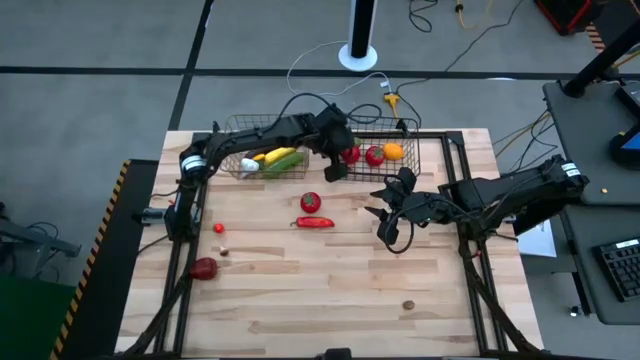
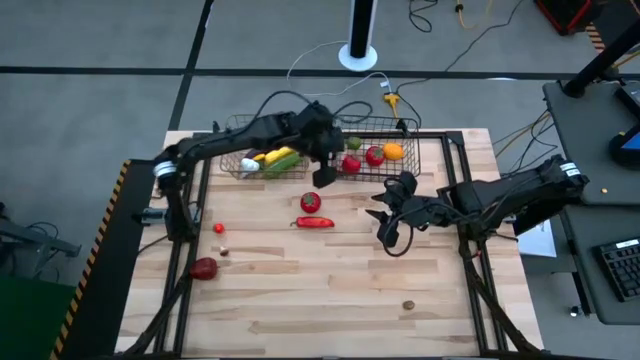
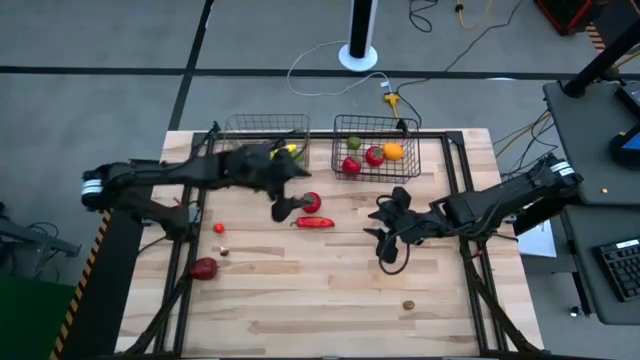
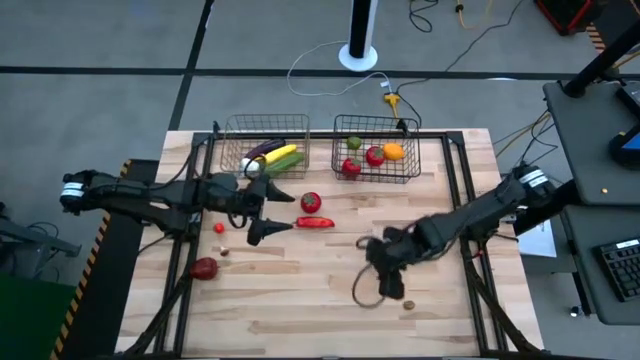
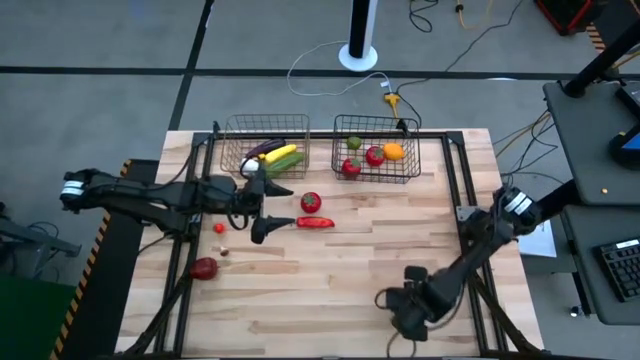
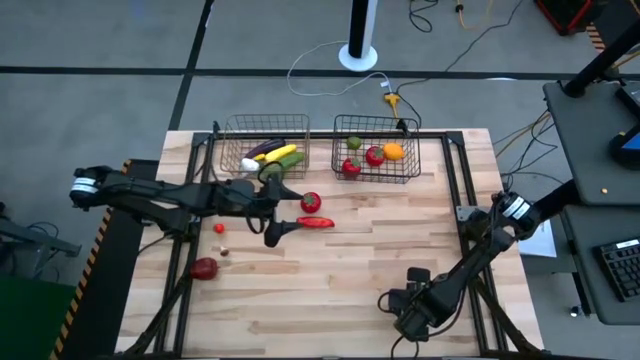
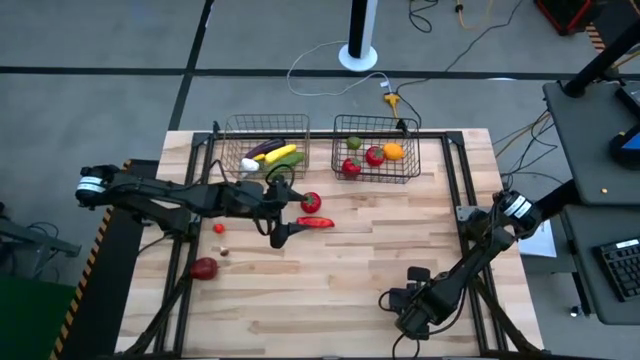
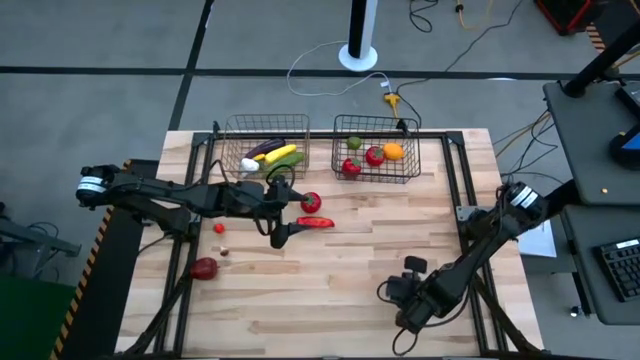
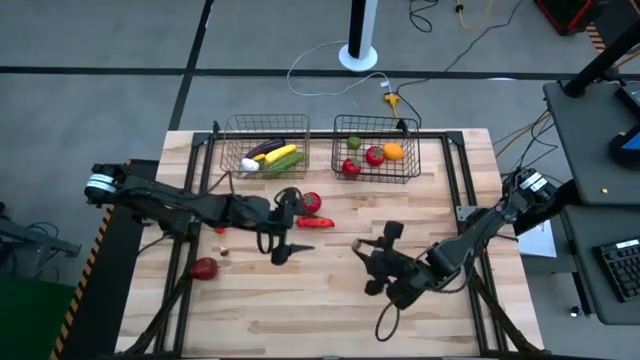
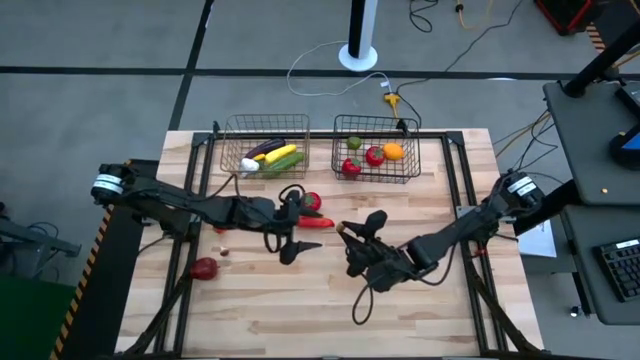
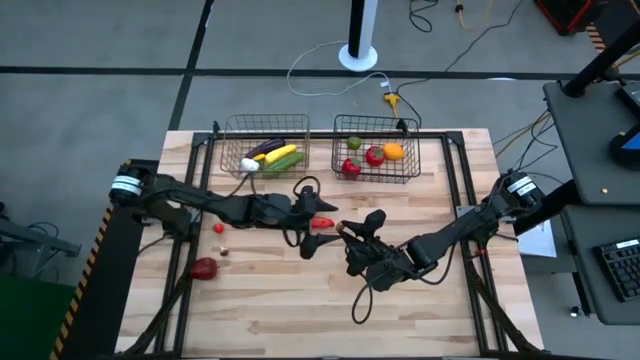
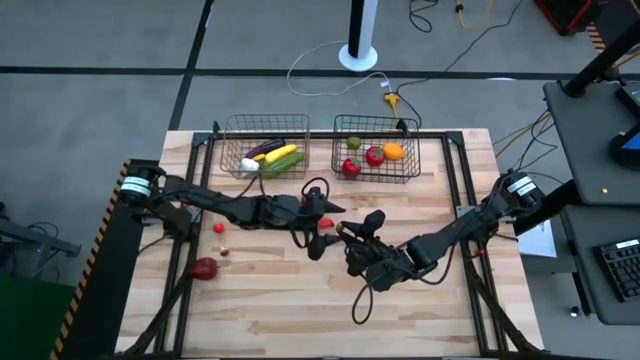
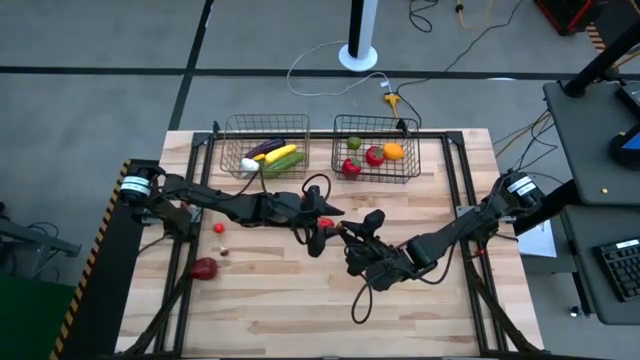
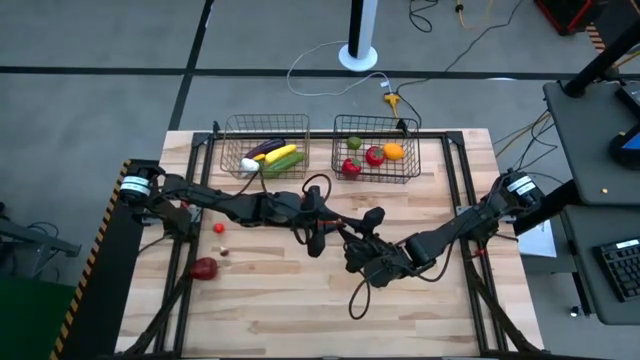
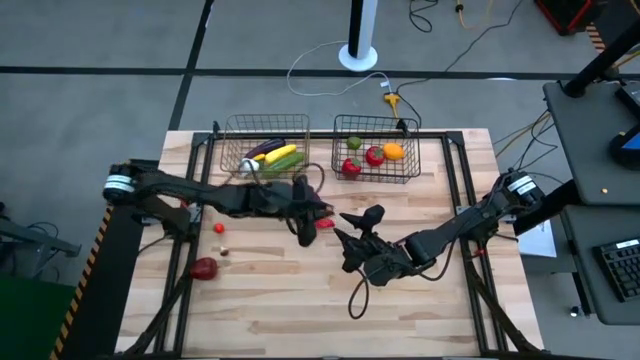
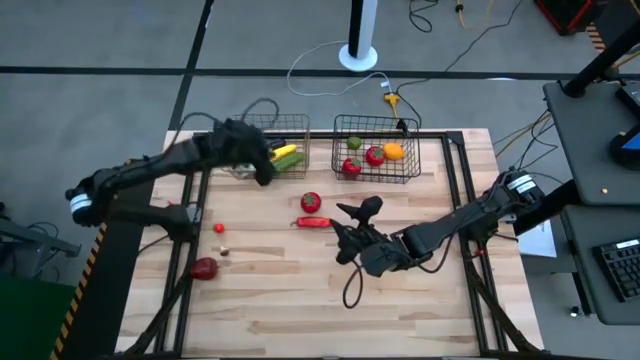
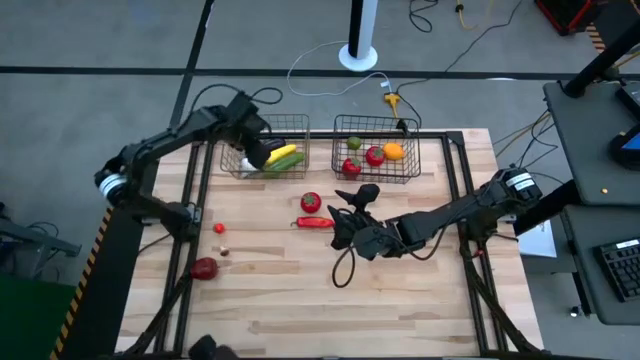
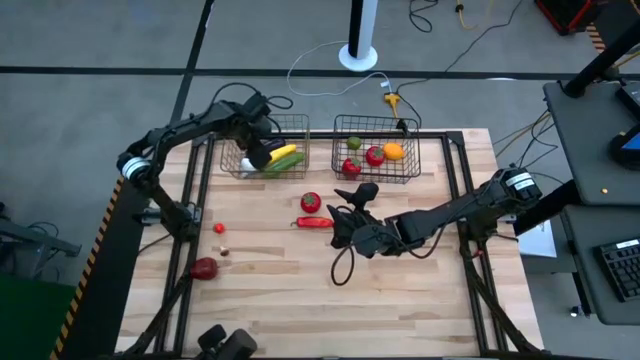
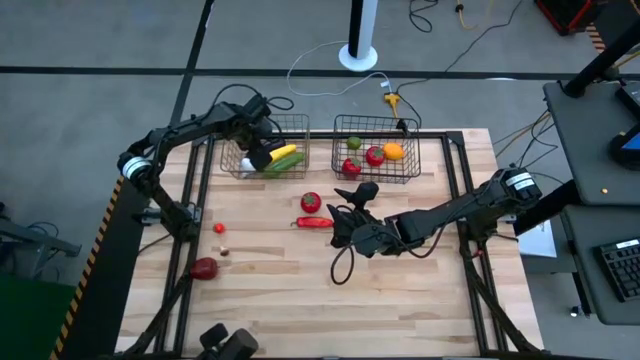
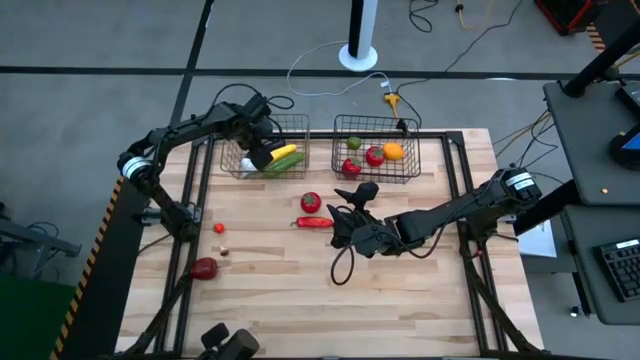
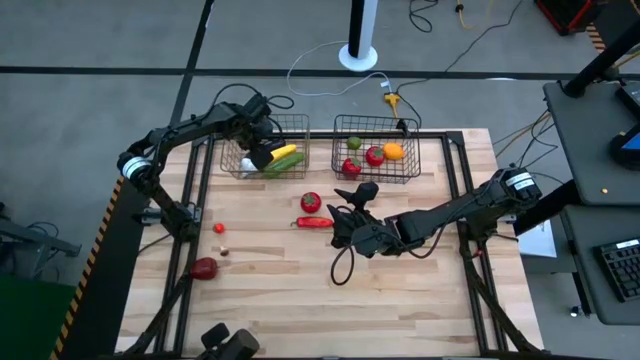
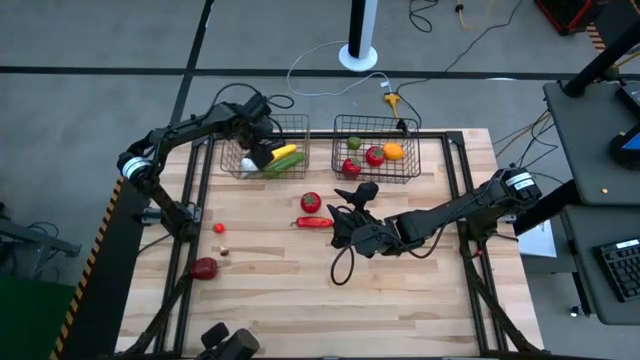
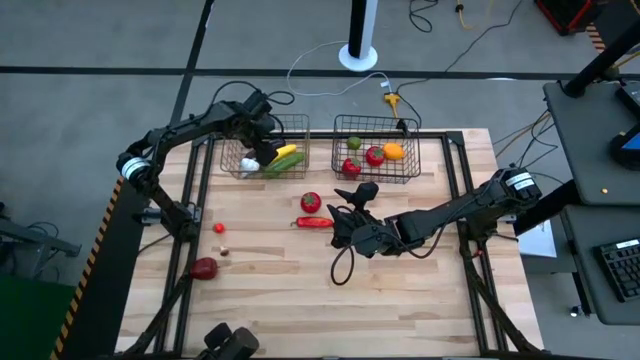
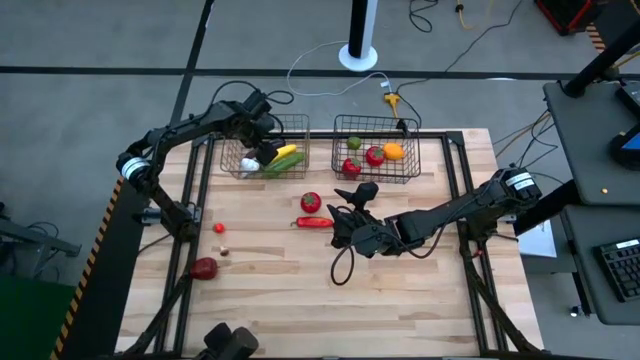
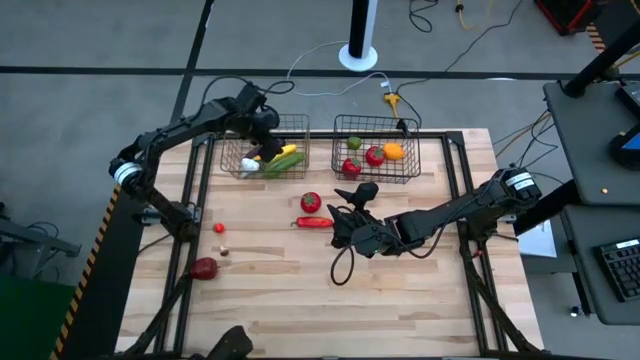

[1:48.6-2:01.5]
Task: Sort produce into baskets
Put the brown potato into the left wire basket

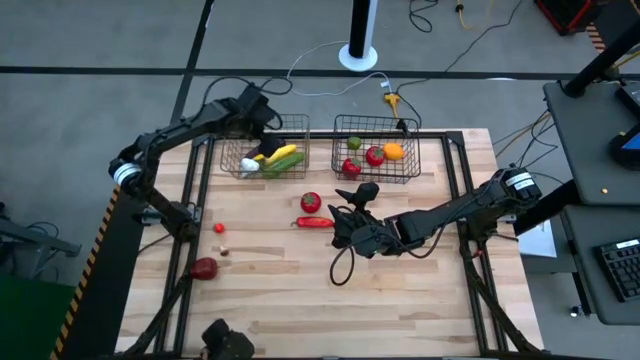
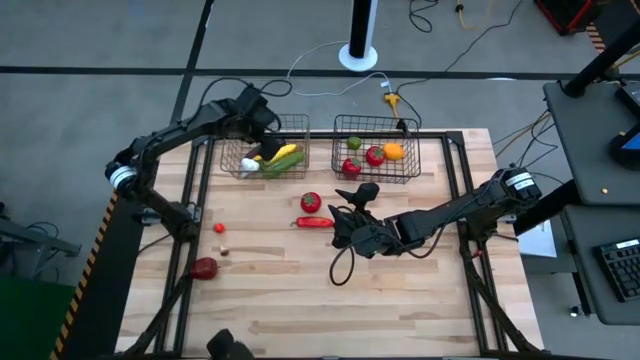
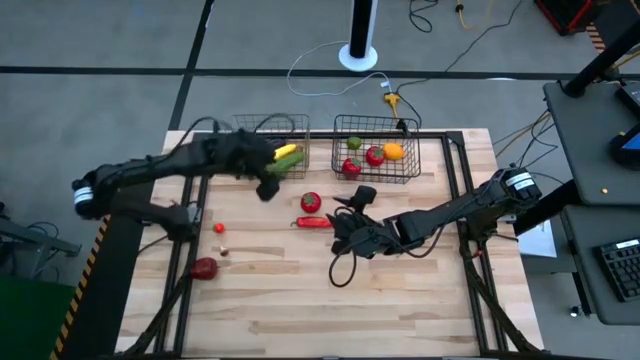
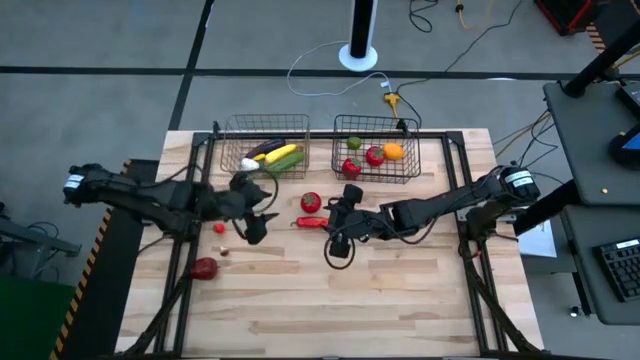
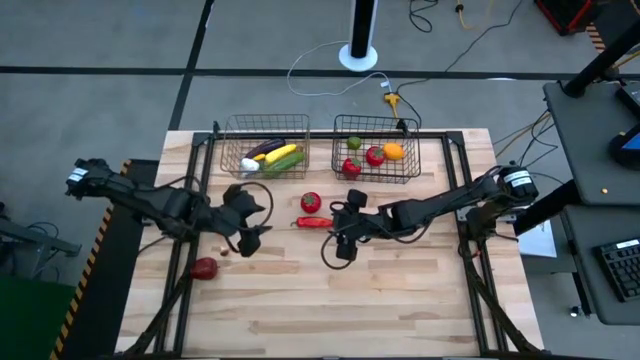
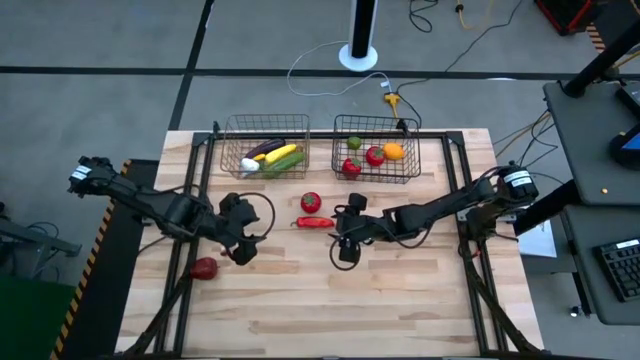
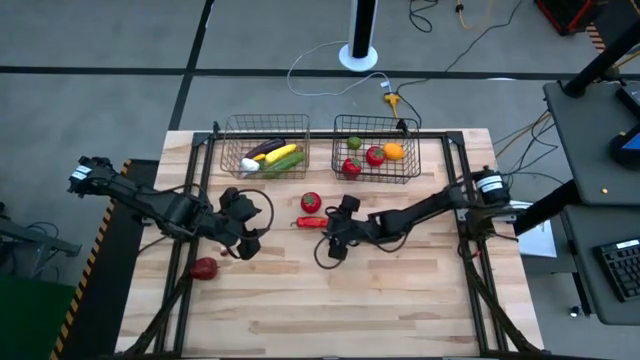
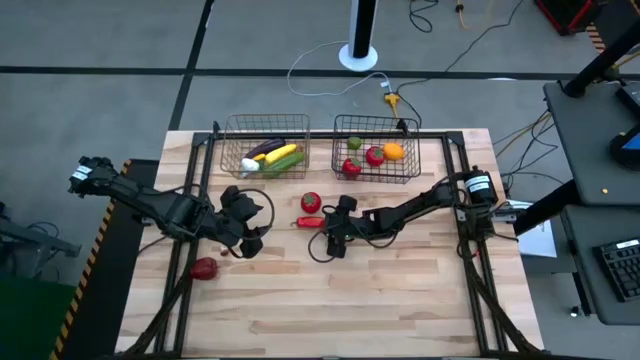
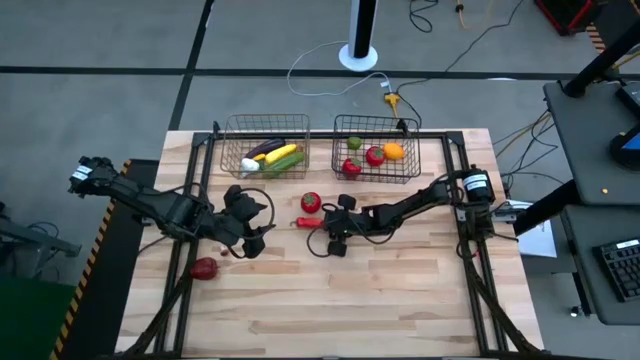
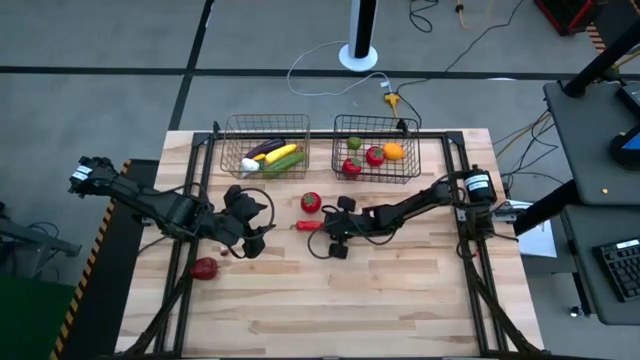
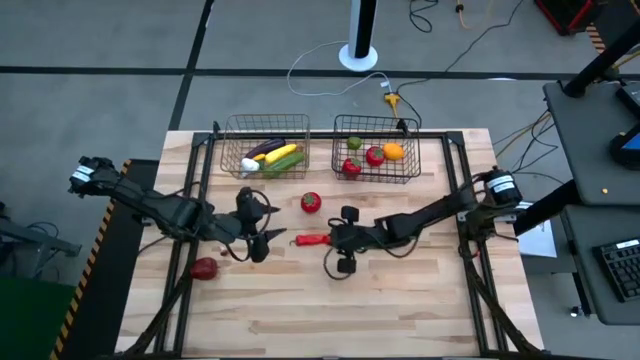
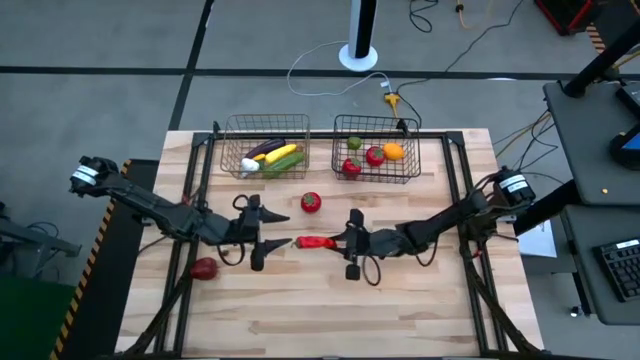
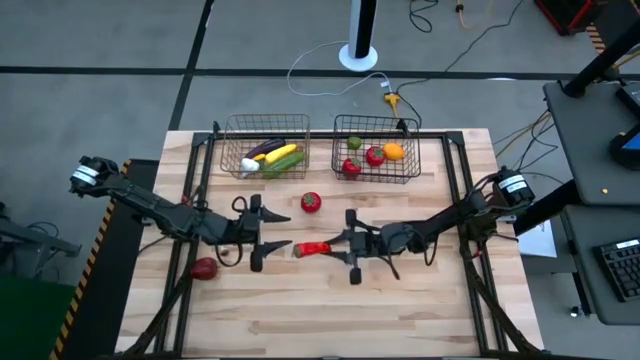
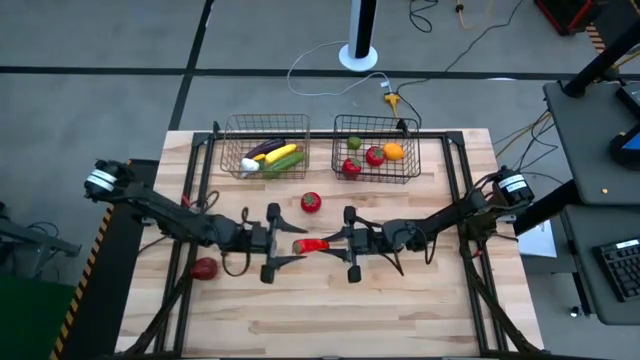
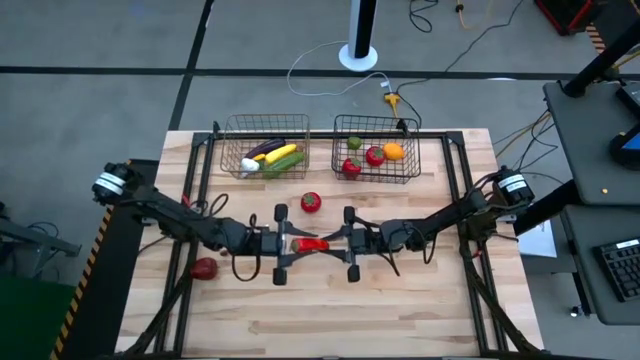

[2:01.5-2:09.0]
Put the red chili pepper into the left wire basket

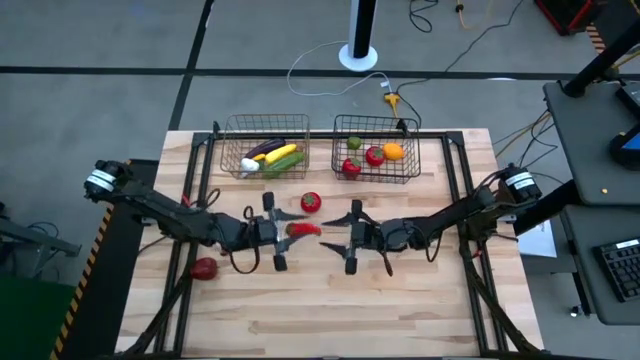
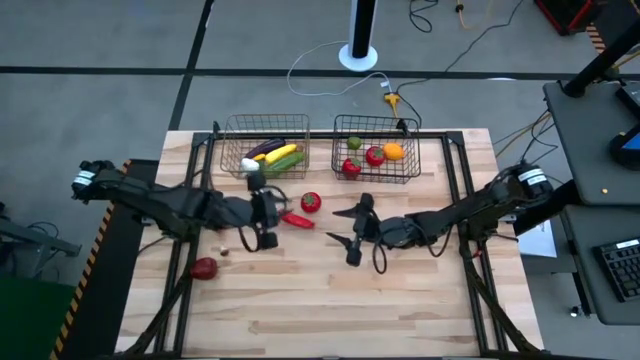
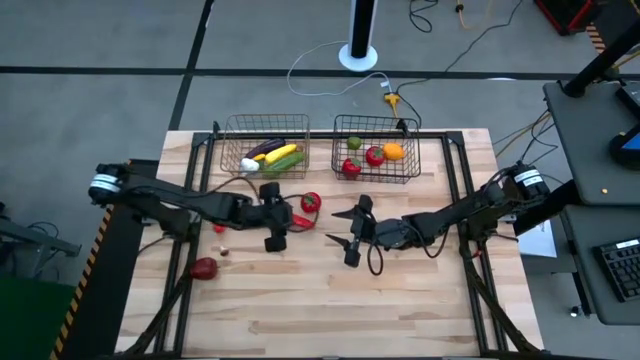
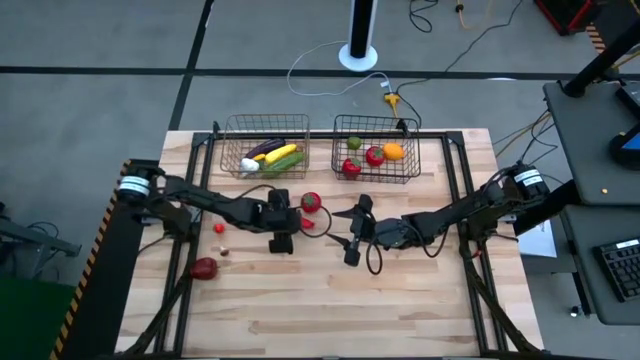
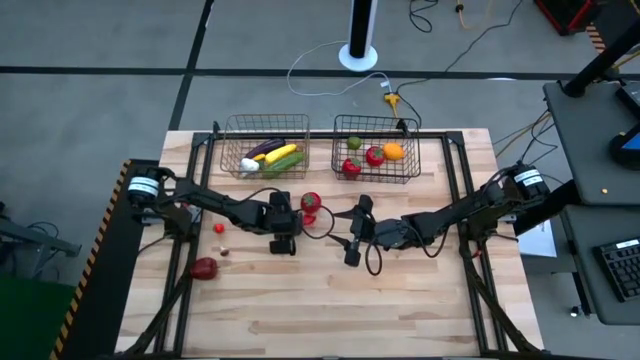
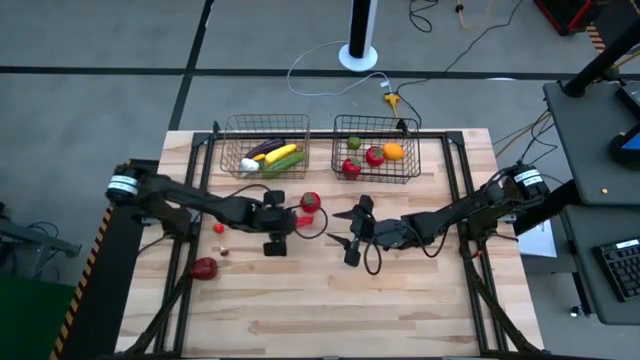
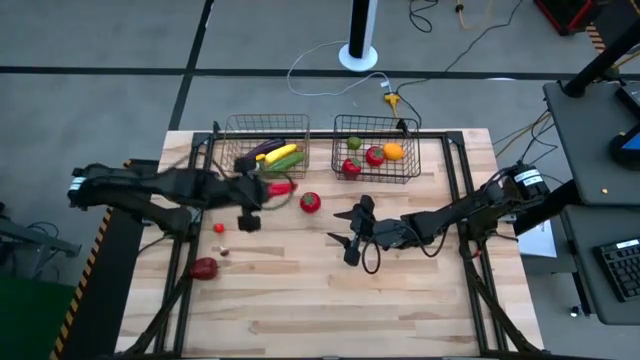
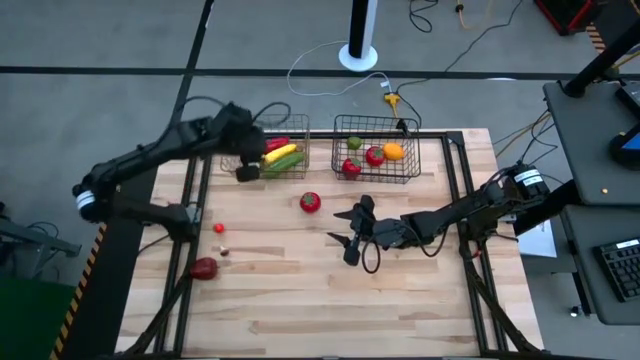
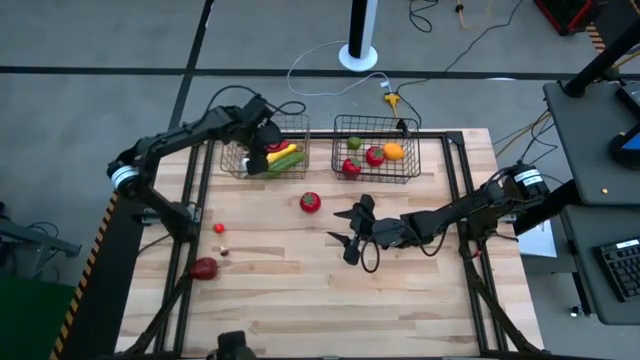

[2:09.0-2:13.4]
Put the red chili pepper into the left wire basket
